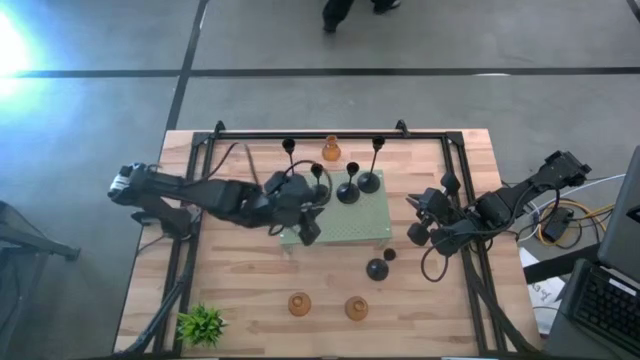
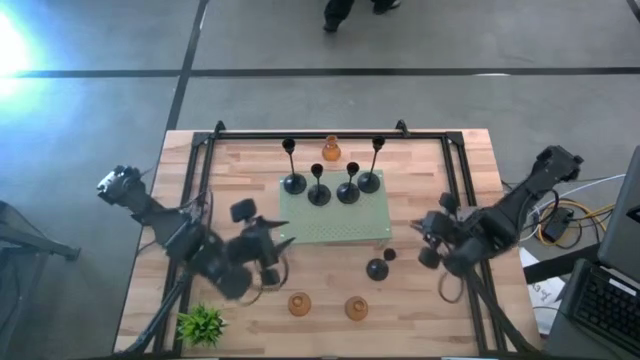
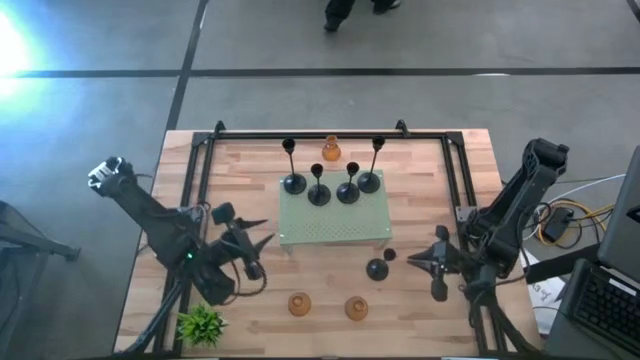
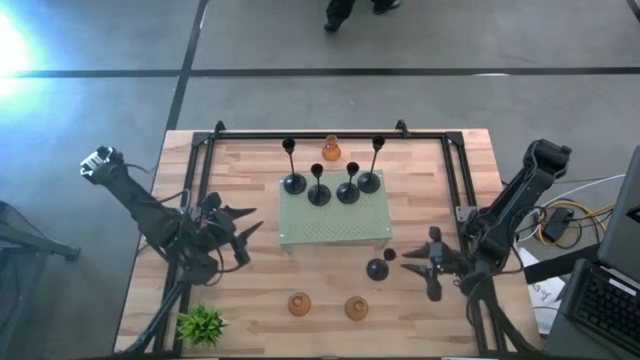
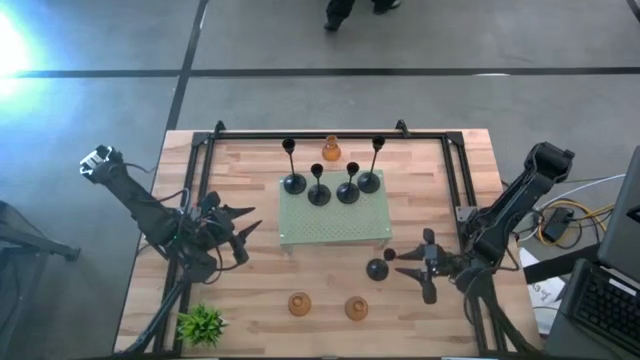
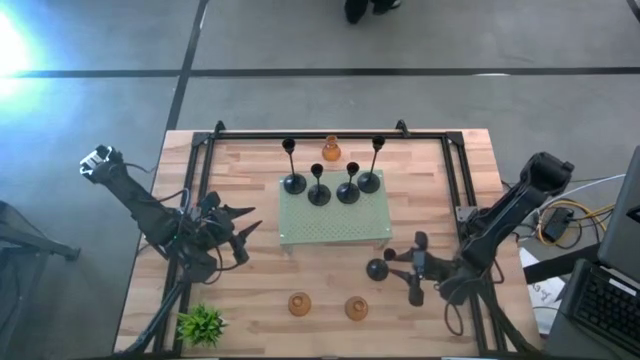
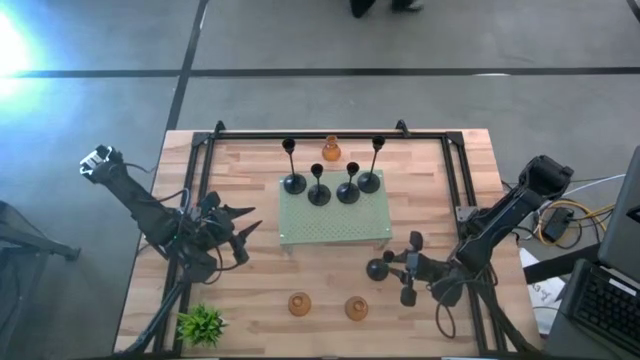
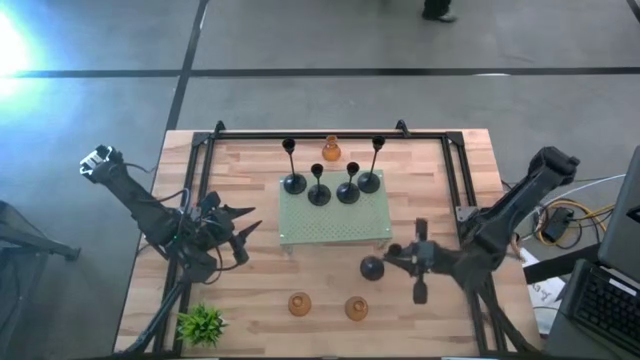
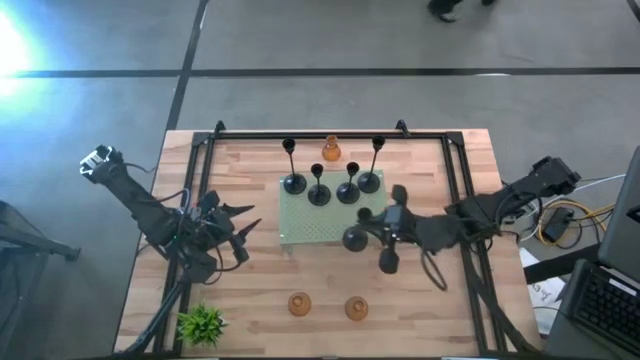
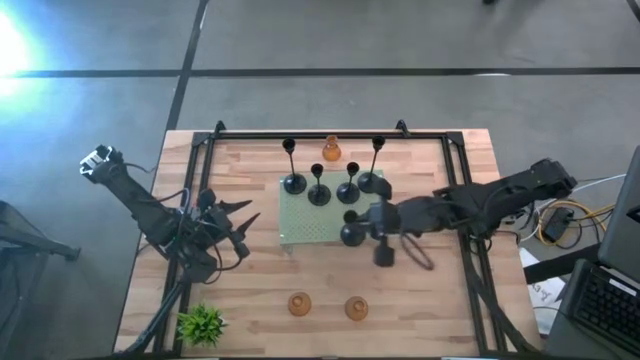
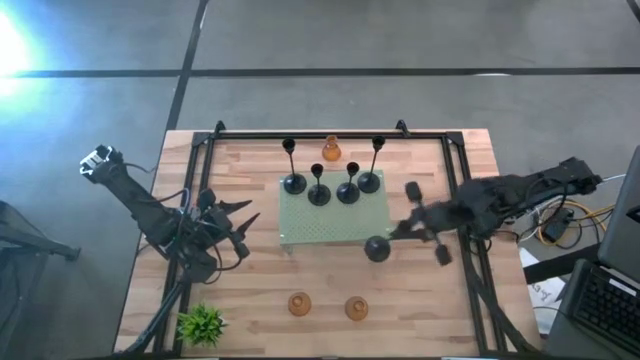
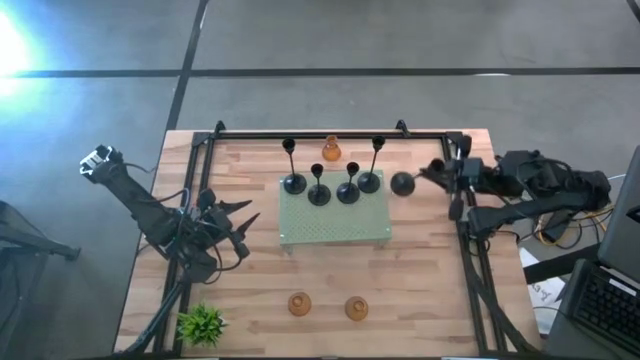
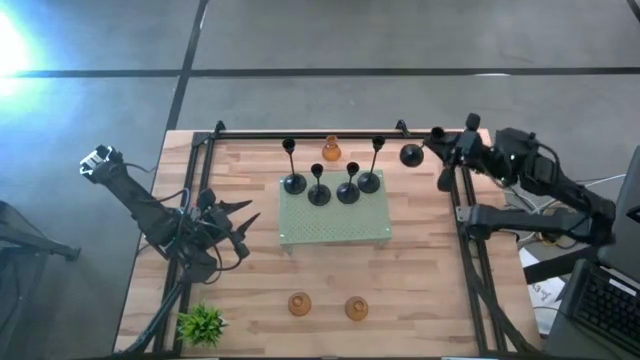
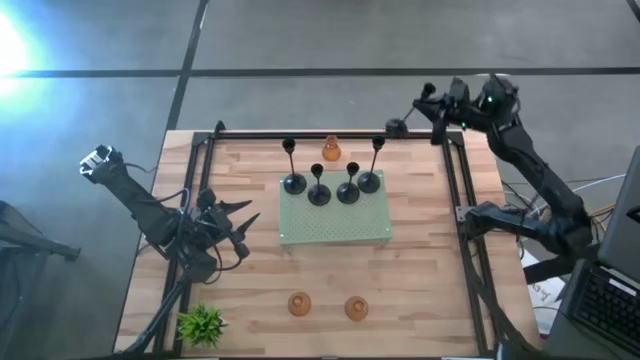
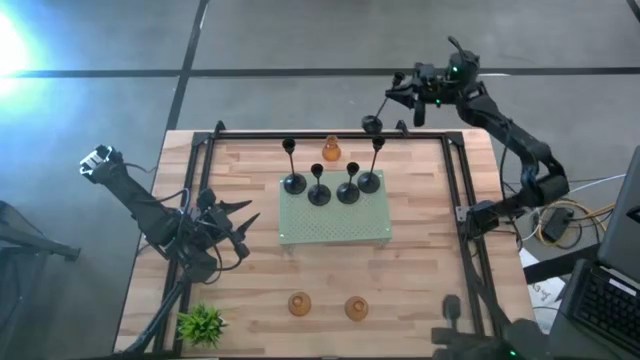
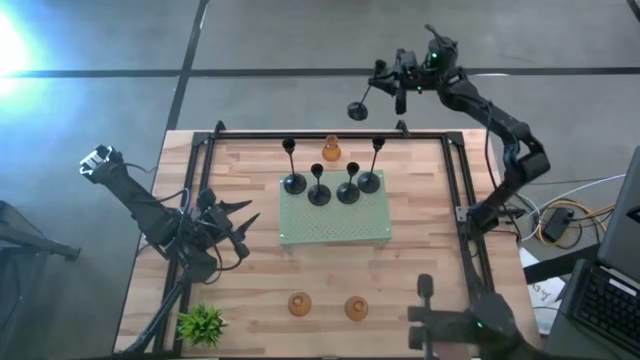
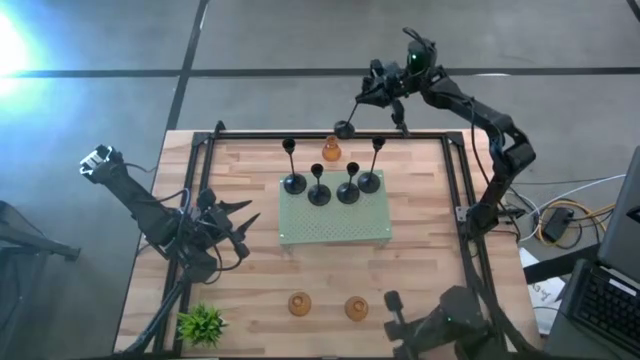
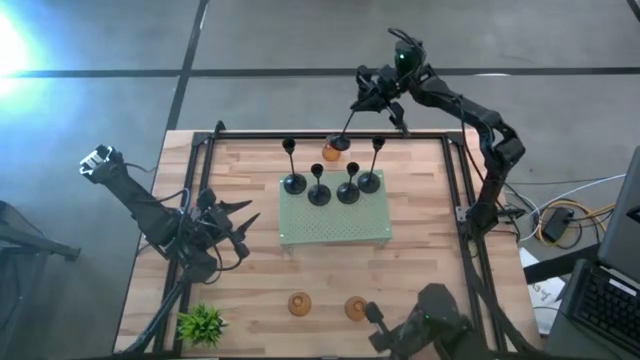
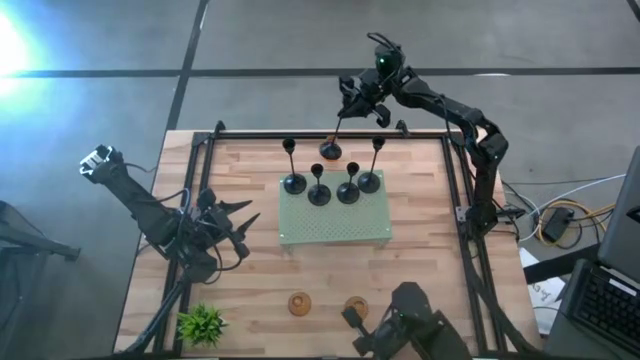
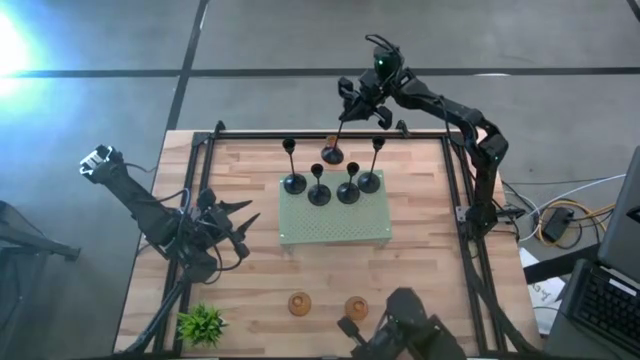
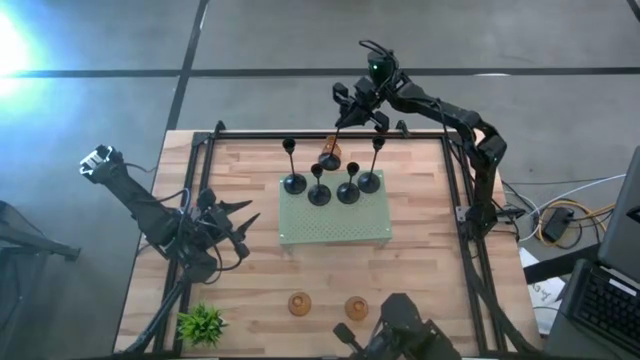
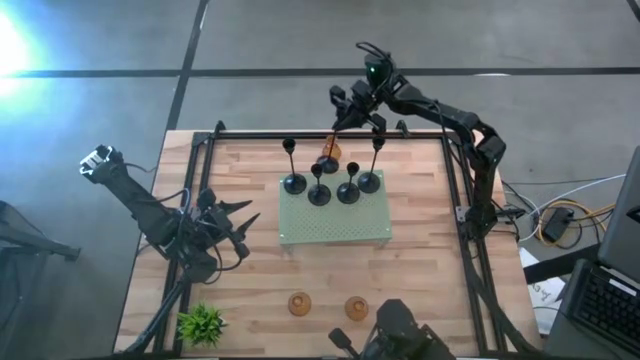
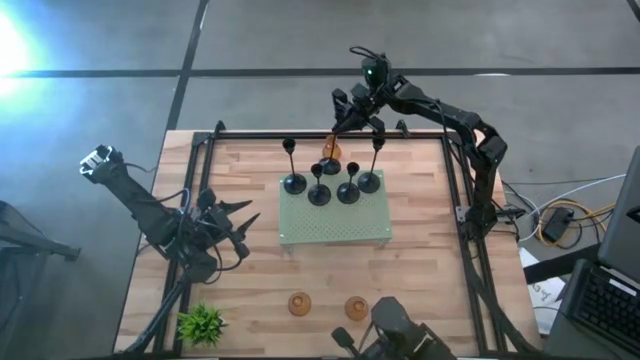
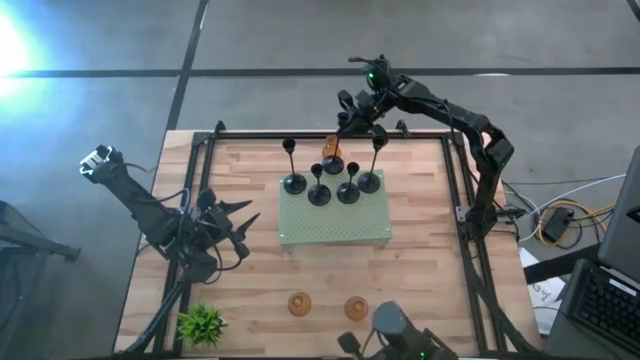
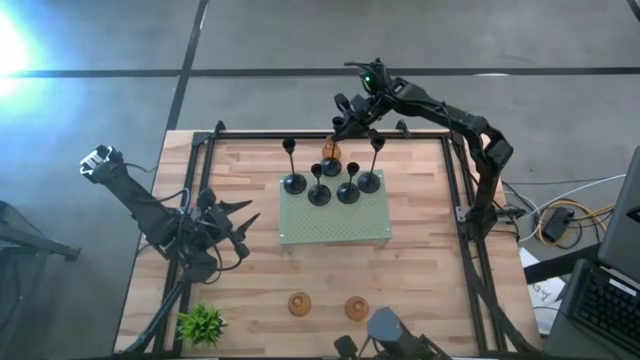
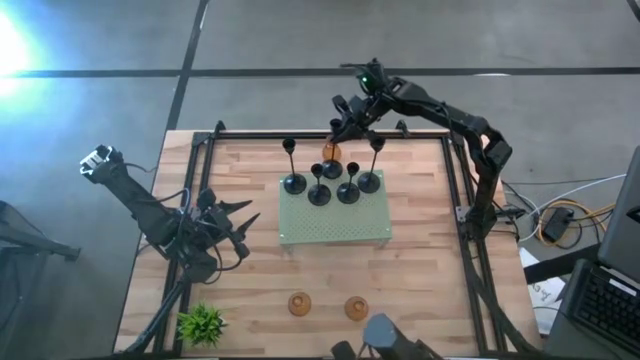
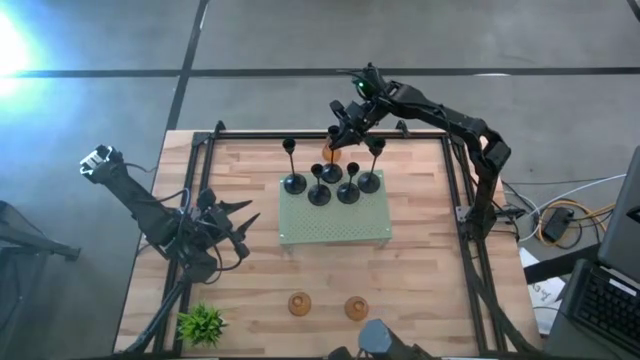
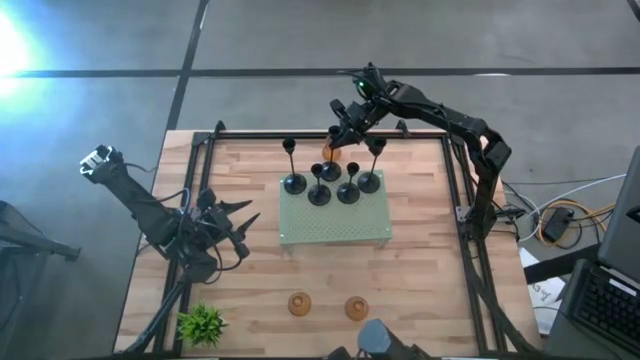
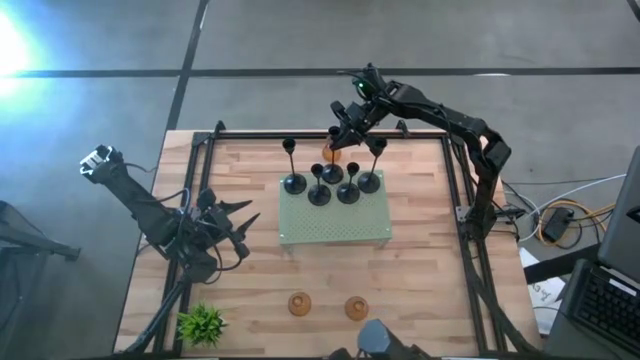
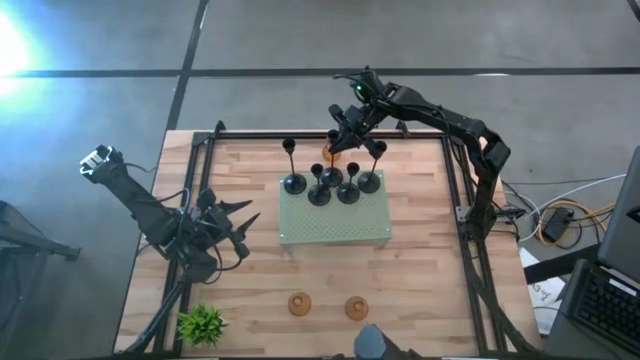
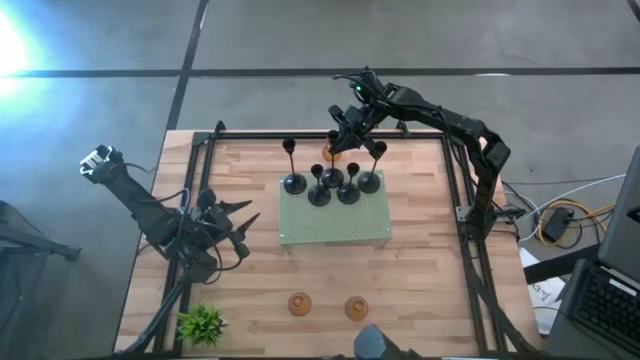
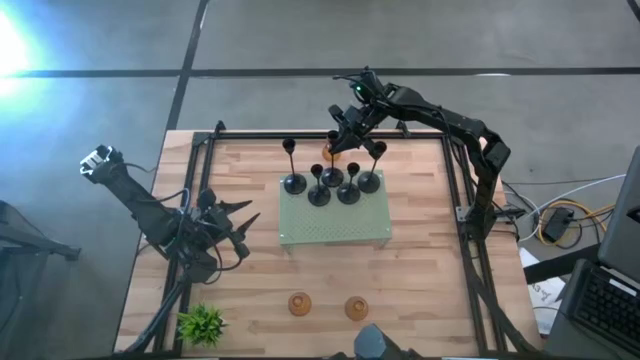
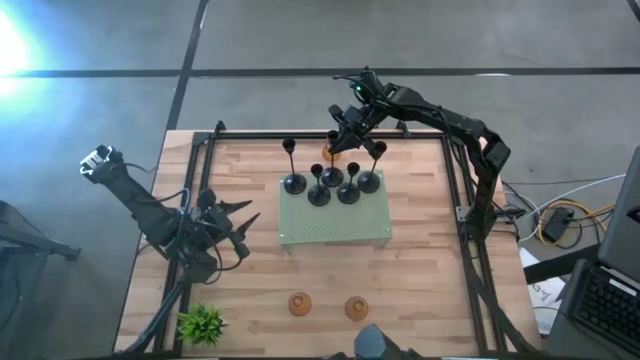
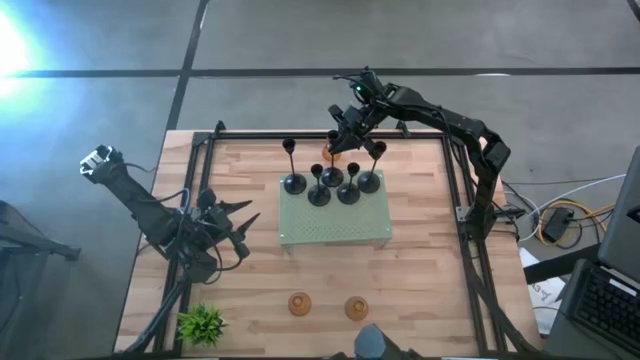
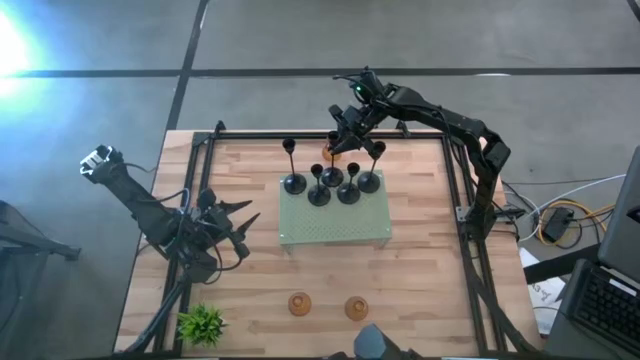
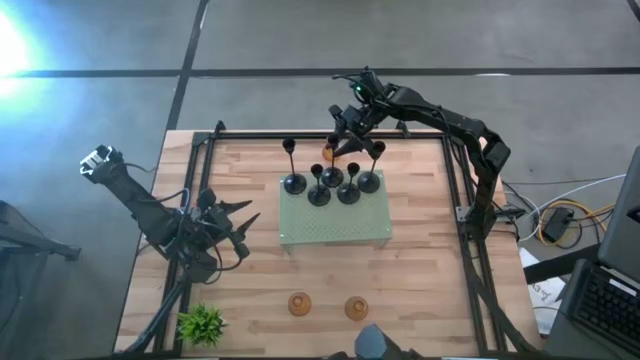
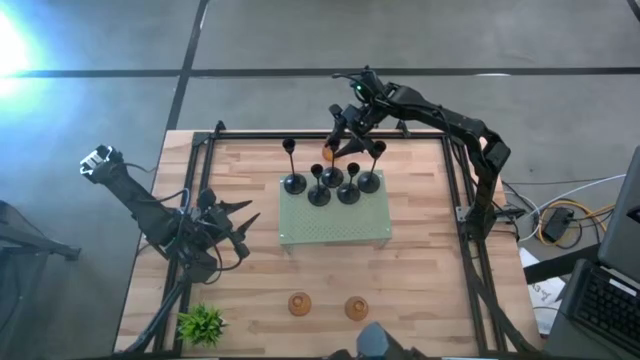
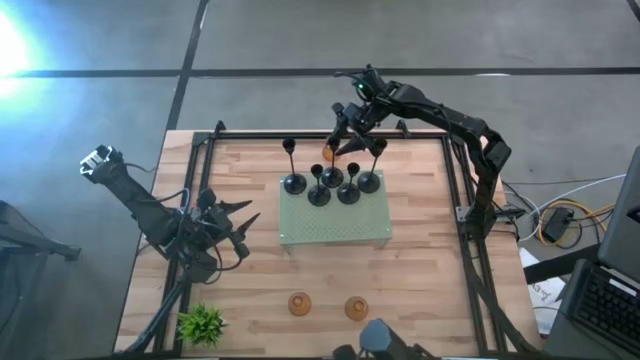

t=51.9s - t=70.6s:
Task: Pick & Place candle stick holders
Put the large black candle holder on the shelf

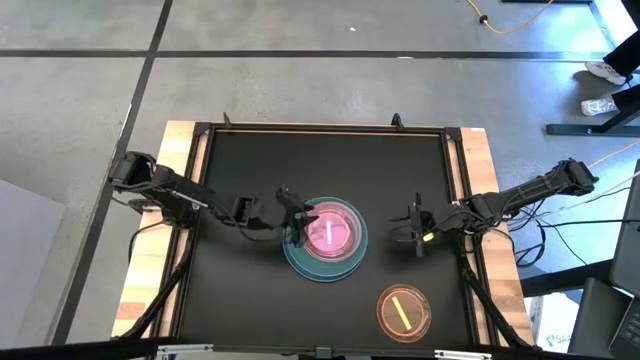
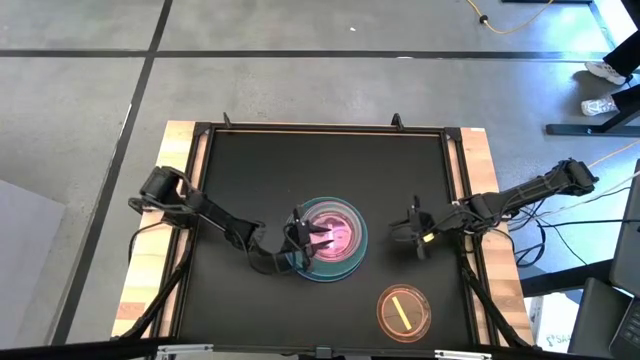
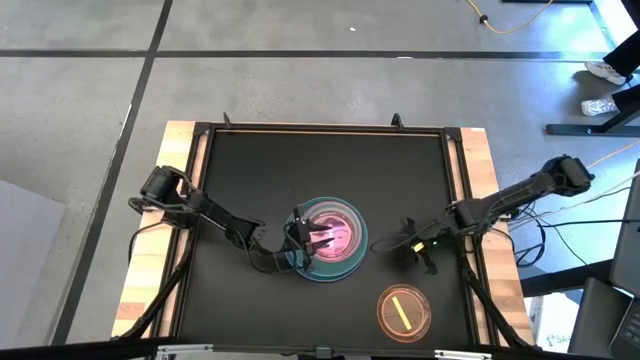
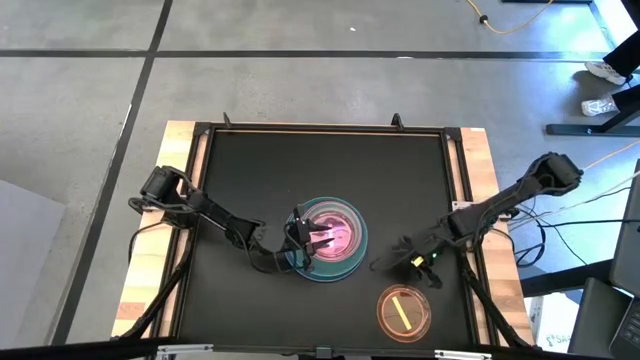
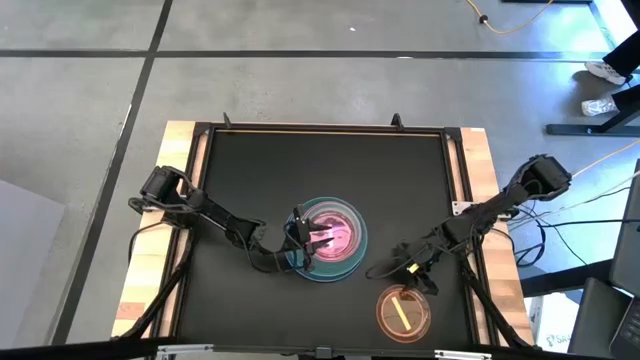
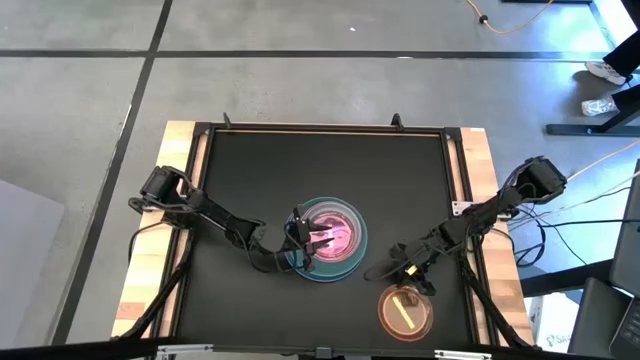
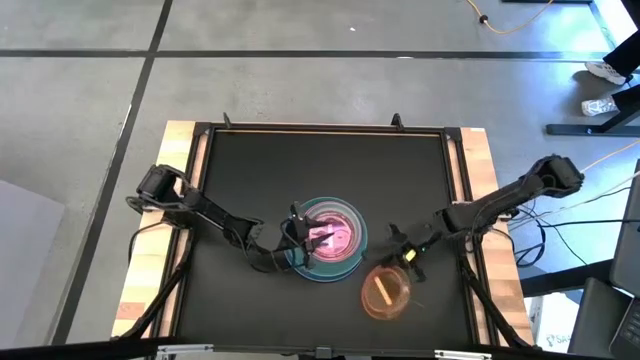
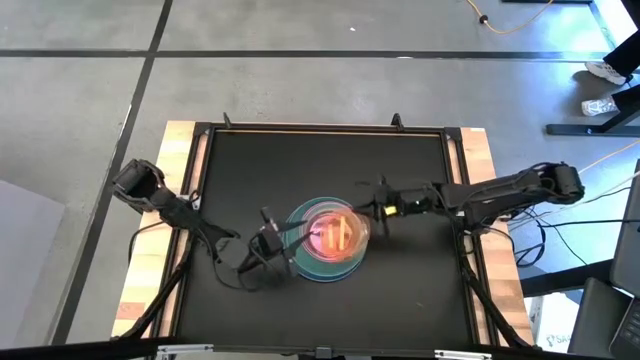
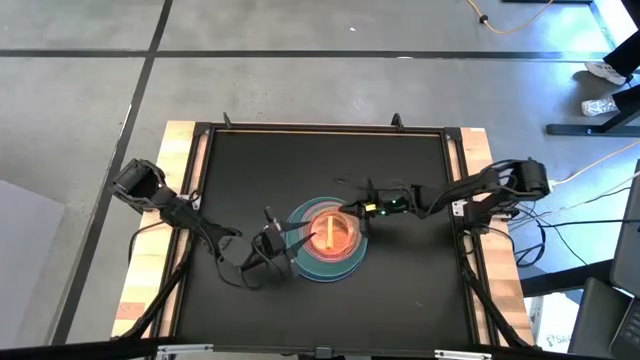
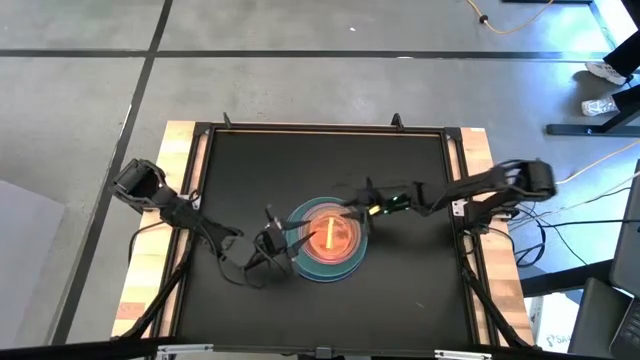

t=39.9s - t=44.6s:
Task: Stack plastic plates
Stack the small orange plate on the small red plate
